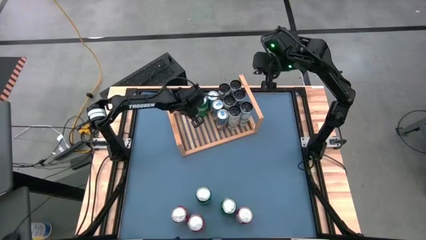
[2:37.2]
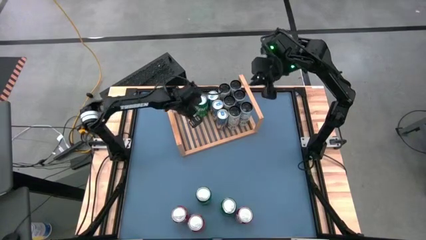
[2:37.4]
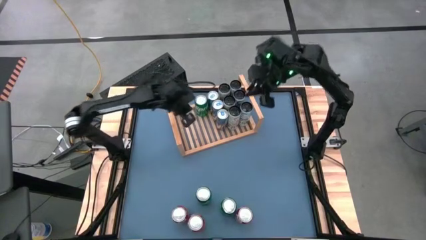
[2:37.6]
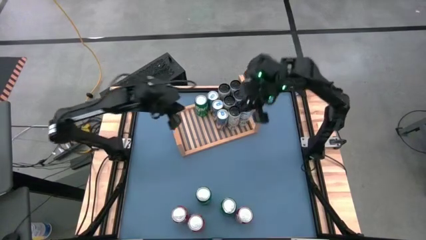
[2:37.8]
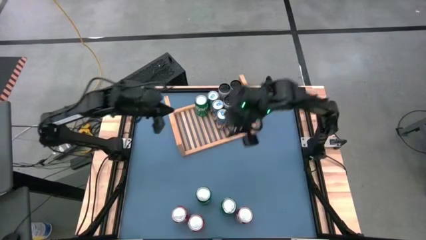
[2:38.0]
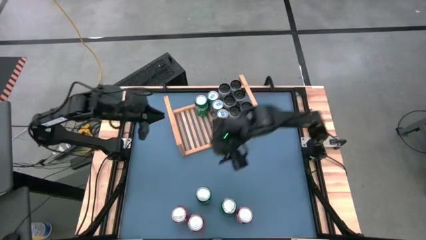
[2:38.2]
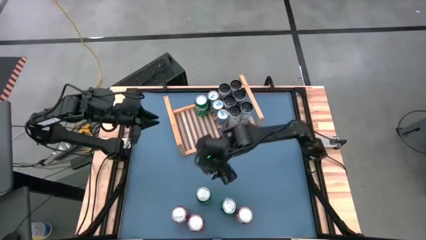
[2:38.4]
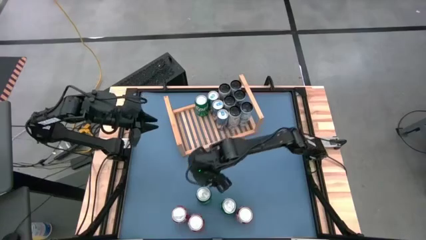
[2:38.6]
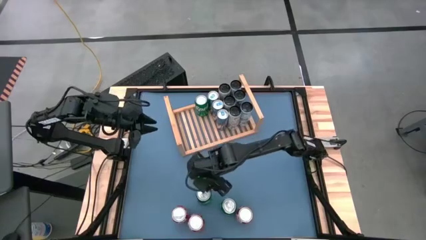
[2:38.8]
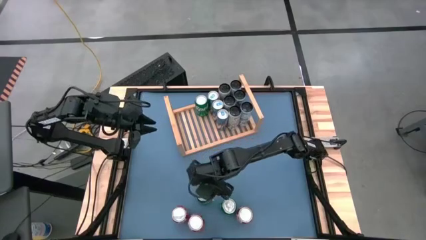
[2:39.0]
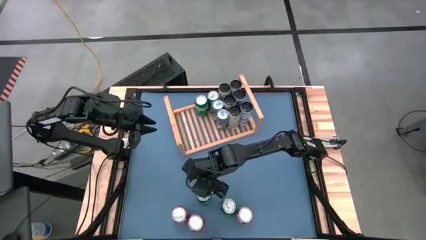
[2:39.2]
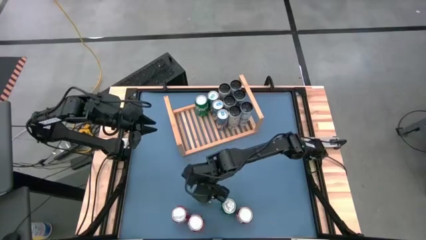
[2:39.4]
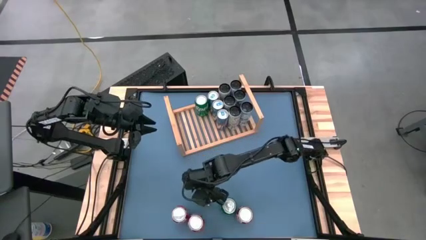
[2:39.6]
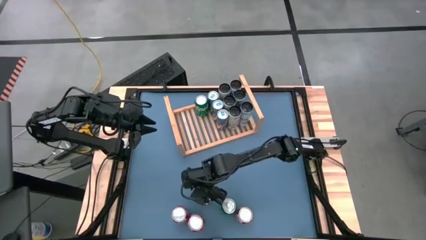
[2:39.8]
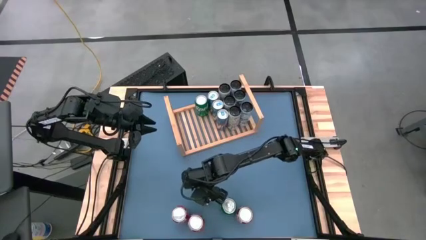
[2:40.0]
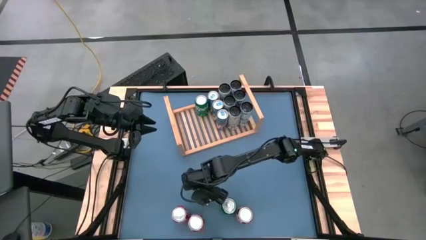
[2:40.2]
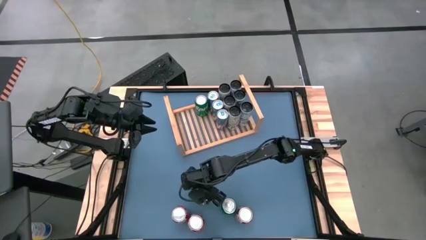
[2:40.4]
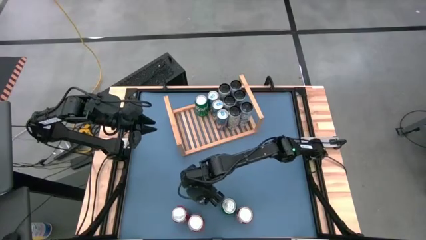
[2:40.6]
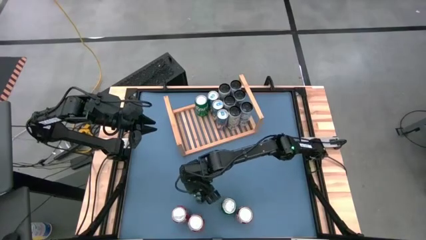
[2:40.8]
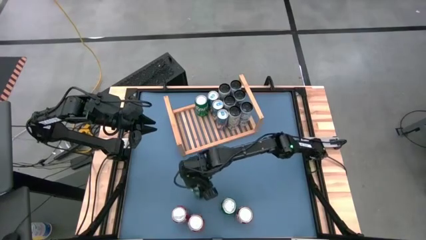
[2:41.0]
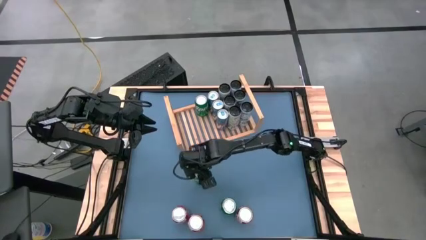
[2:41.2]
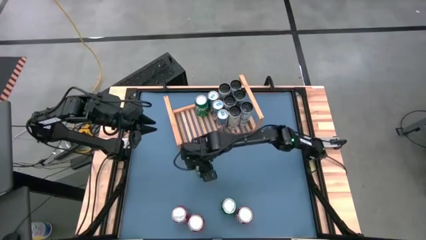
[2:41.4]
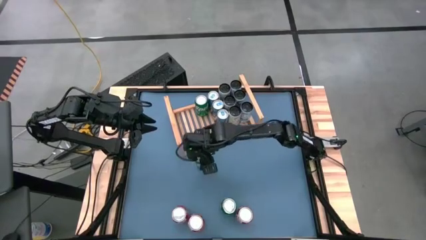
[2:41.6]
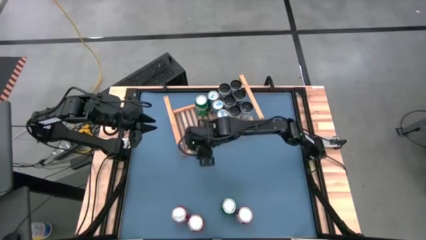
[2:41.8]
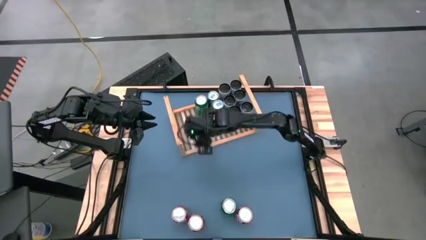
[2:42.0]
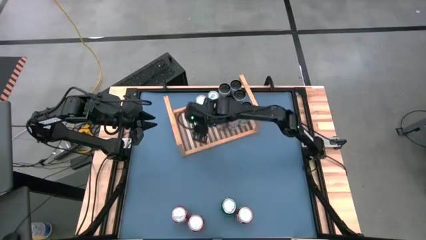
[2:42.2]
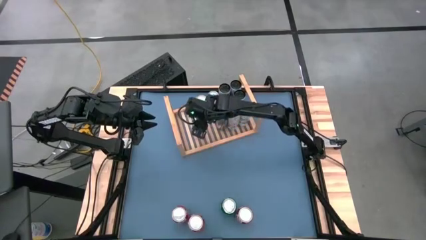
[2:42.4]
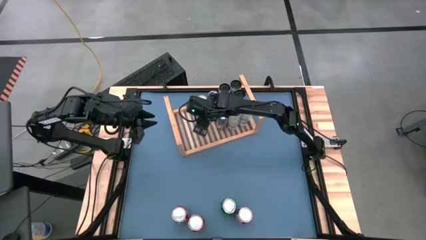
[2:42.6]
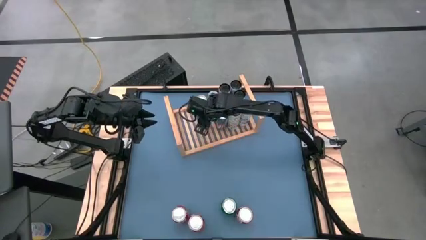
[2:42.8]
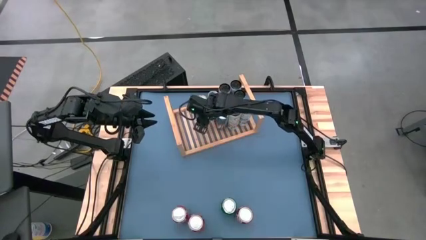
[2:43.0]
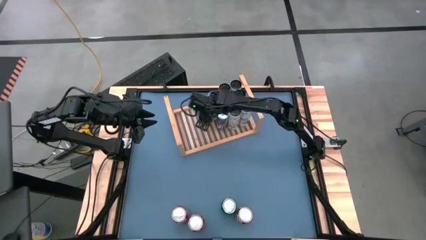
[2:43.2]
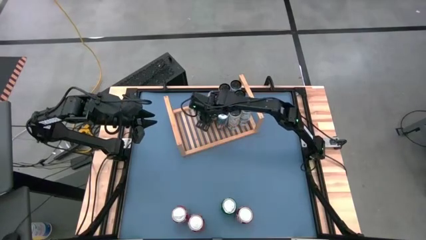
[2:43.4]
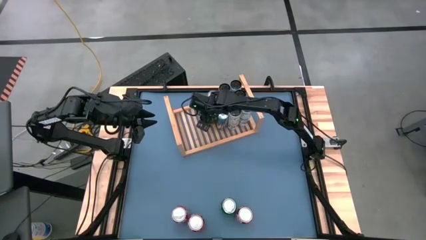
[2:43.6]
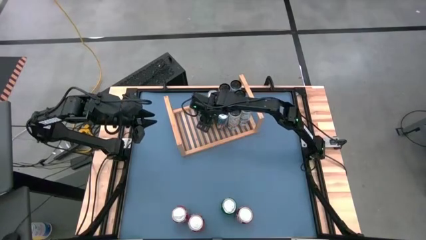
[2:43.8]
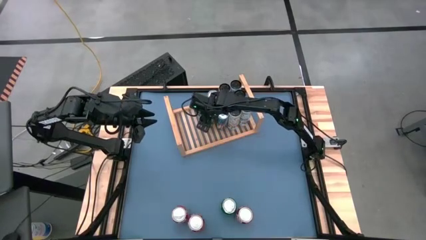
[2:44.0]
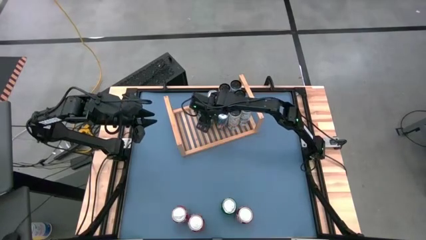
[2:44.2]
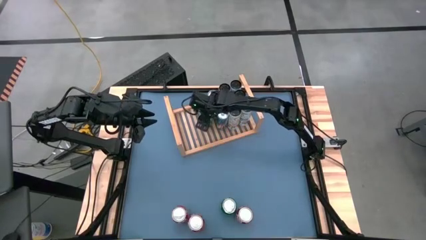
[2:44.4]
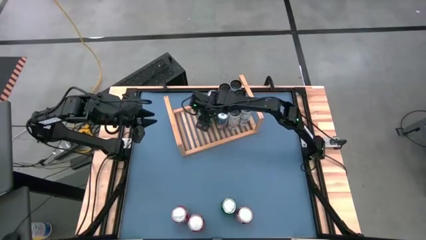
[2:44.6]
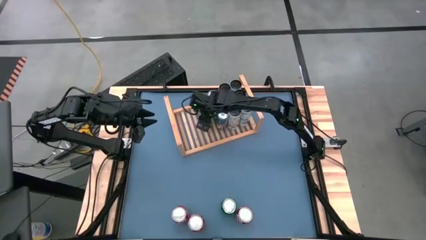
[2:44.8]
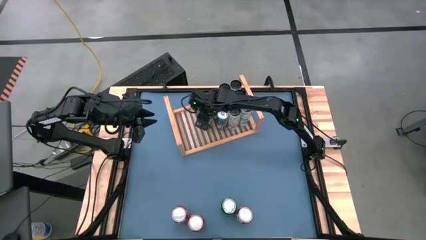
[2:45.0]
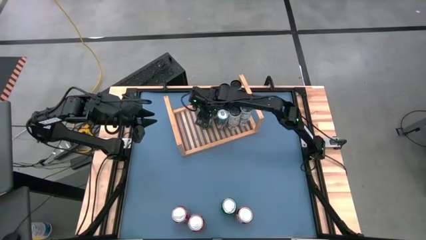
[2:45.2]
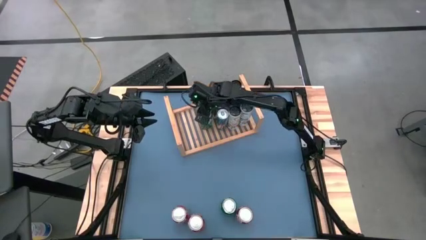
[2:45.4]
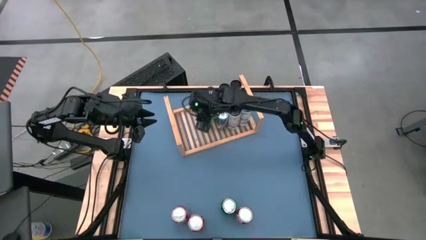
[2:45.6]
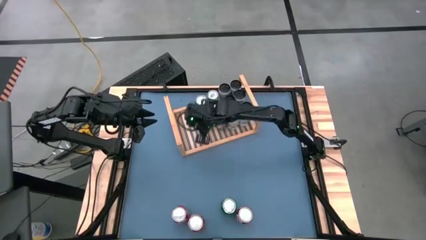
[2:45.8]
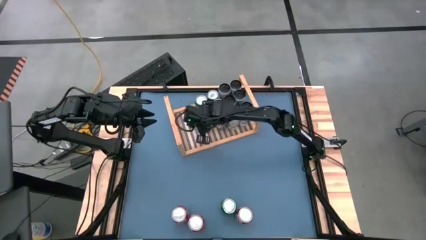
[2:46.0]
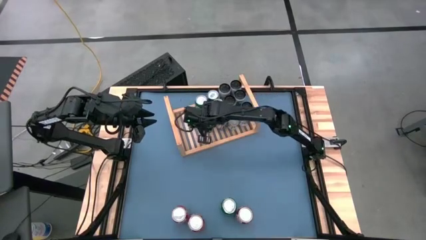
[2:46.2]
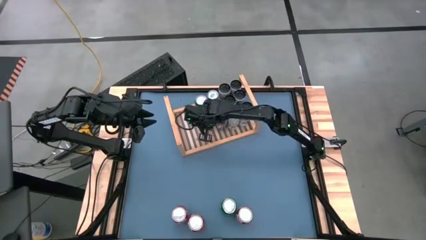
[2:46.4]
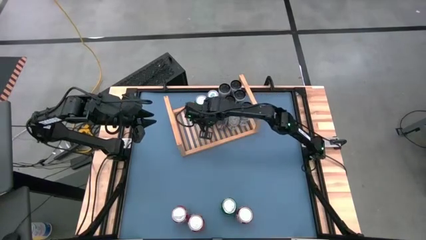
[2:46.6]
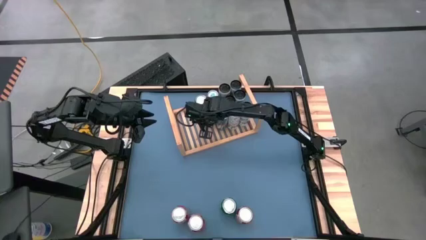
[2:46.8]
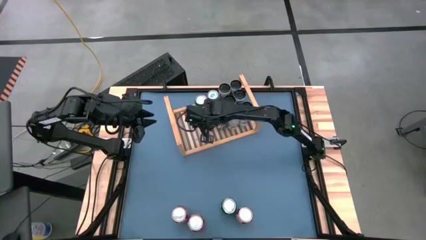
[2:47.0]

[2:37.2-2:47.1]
Task: Place canned beverage on shelf
Put the green soda can on the shelf aligned with the other green soda can
